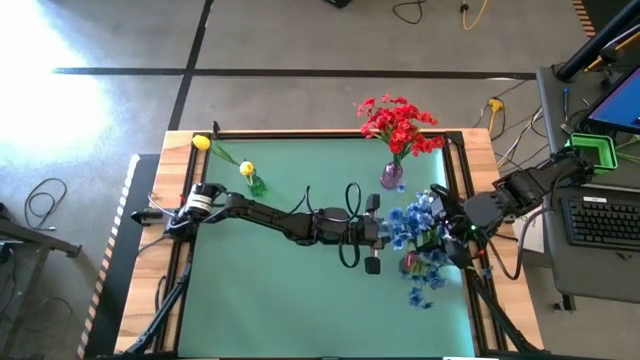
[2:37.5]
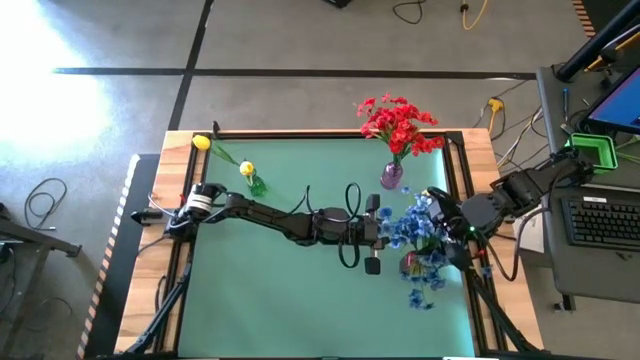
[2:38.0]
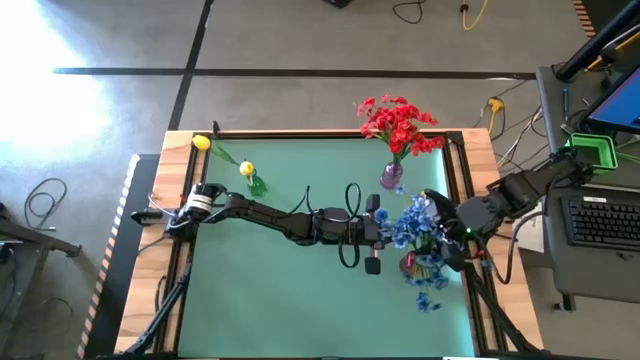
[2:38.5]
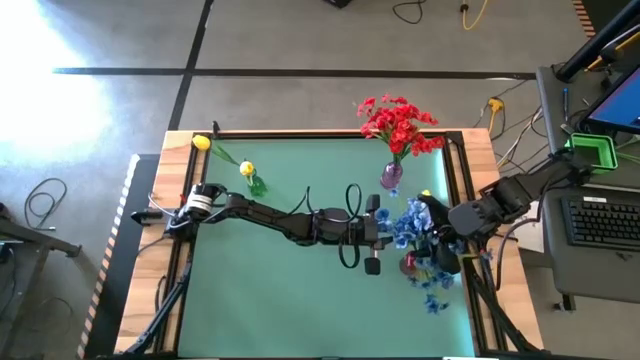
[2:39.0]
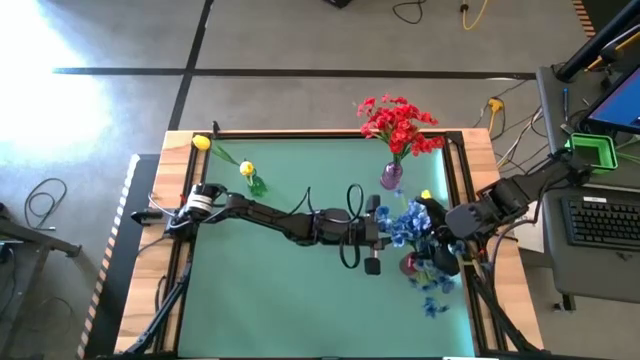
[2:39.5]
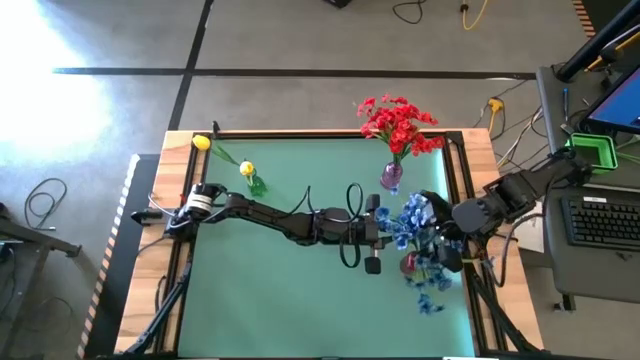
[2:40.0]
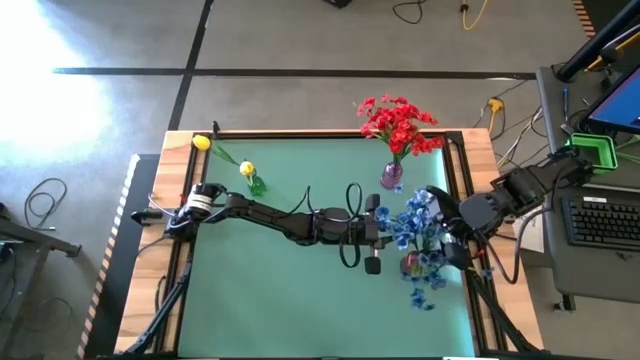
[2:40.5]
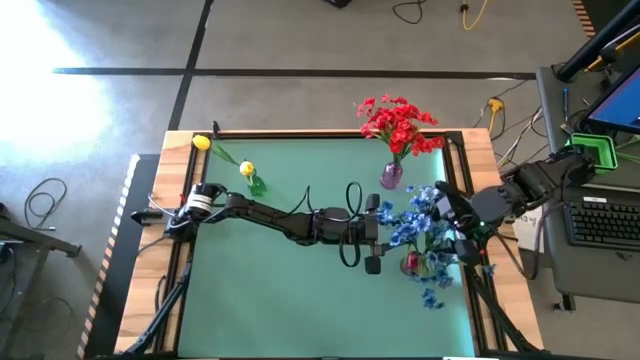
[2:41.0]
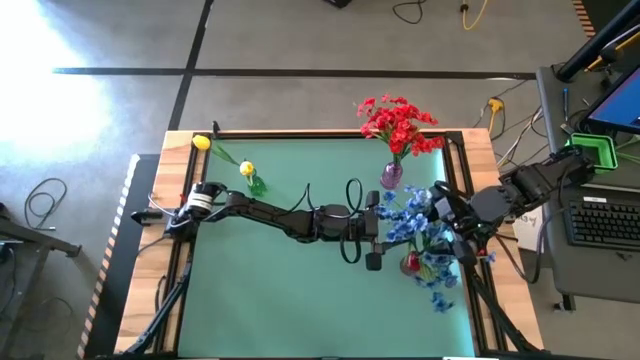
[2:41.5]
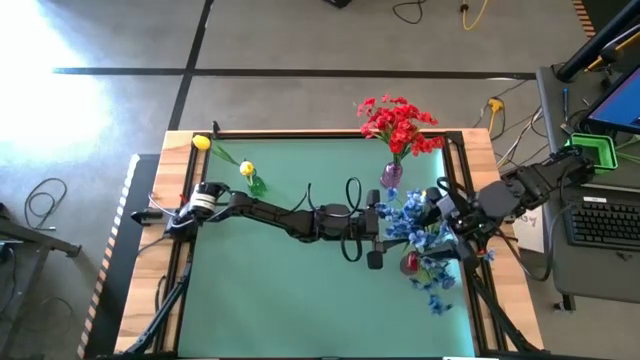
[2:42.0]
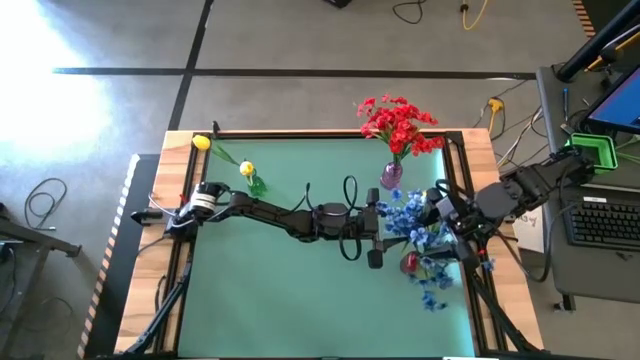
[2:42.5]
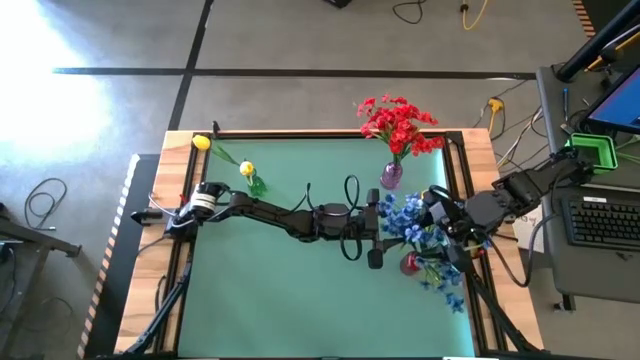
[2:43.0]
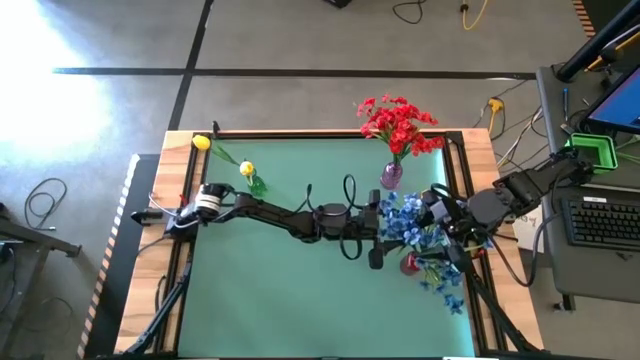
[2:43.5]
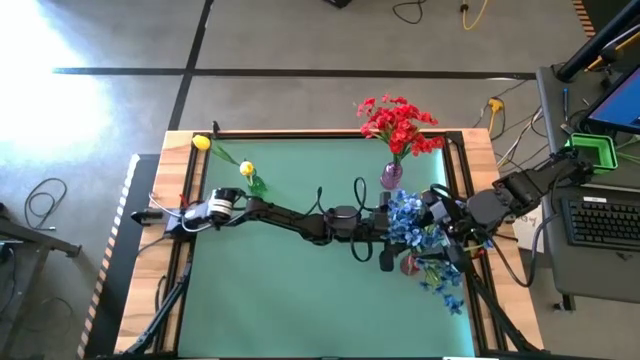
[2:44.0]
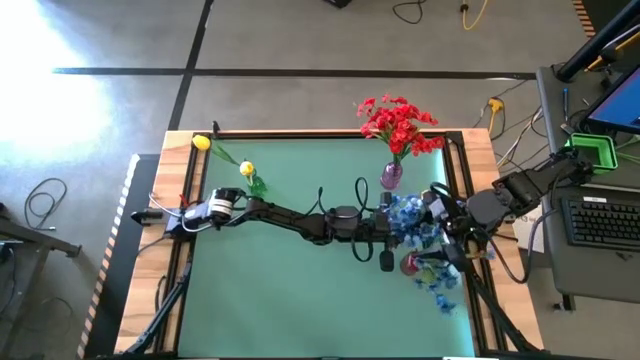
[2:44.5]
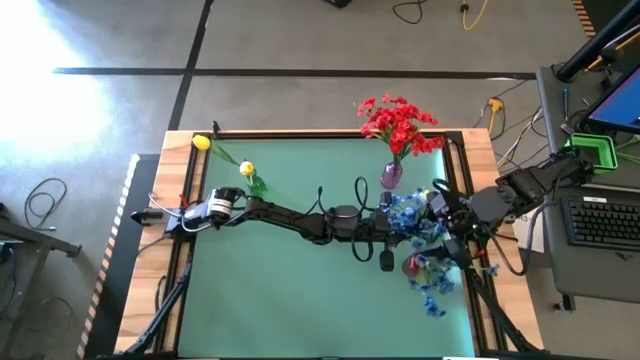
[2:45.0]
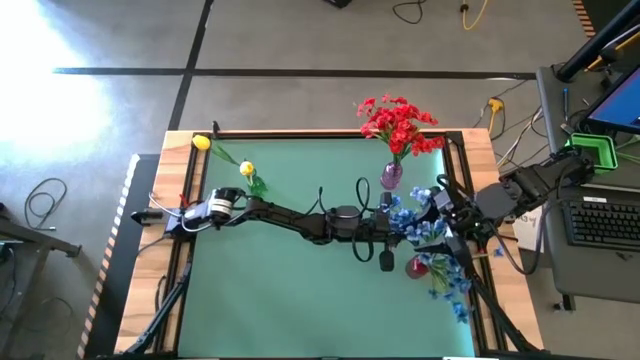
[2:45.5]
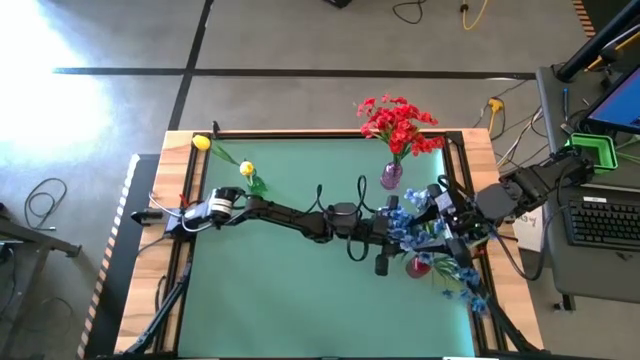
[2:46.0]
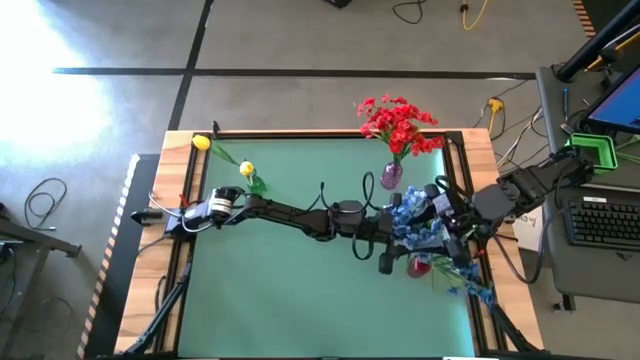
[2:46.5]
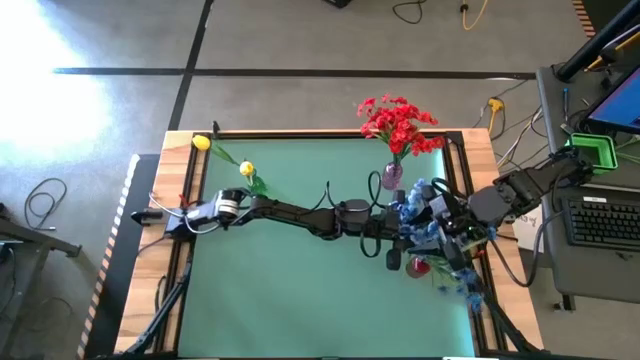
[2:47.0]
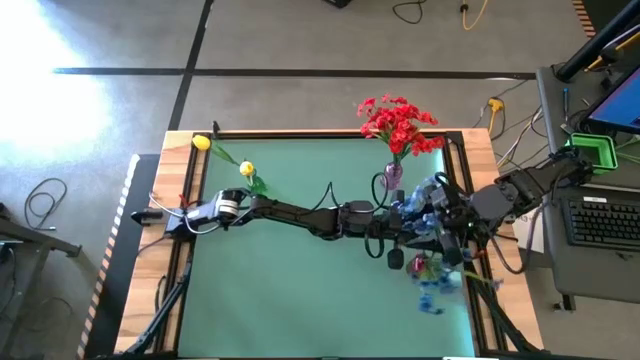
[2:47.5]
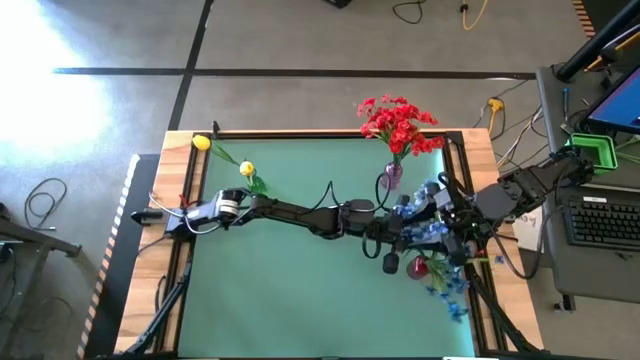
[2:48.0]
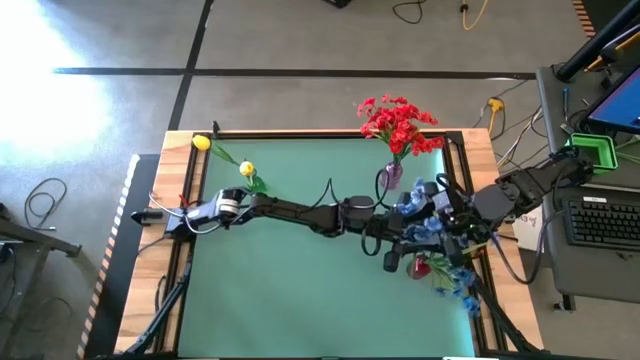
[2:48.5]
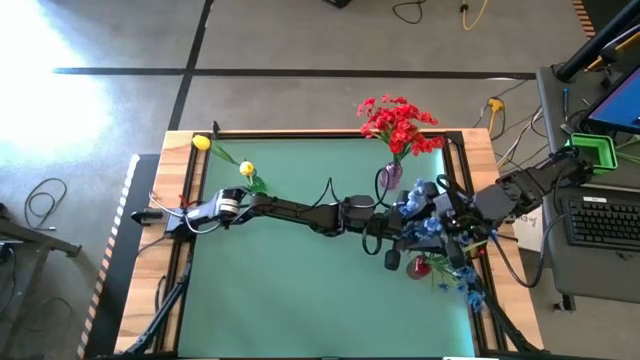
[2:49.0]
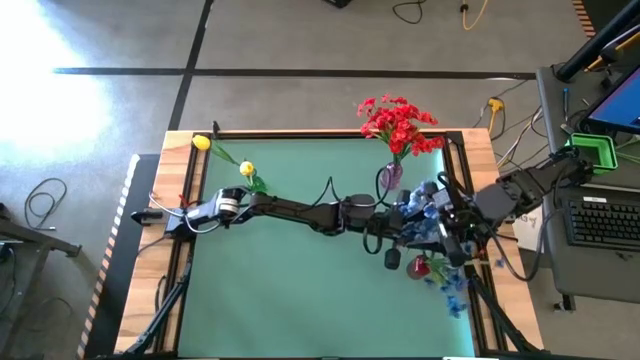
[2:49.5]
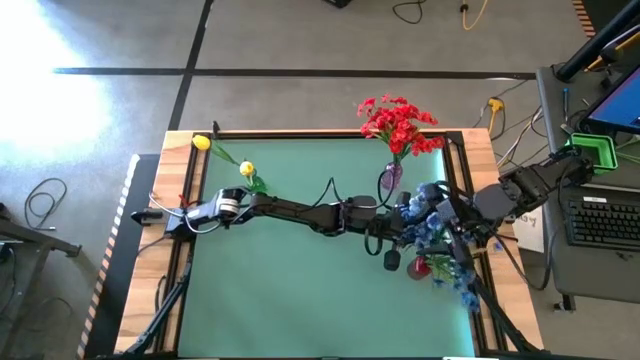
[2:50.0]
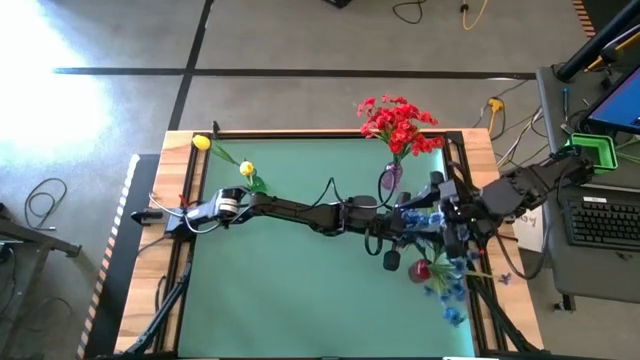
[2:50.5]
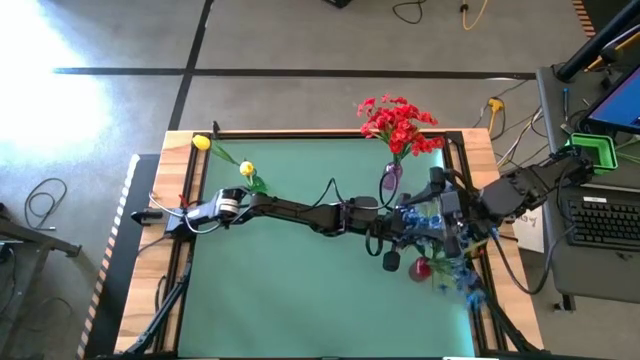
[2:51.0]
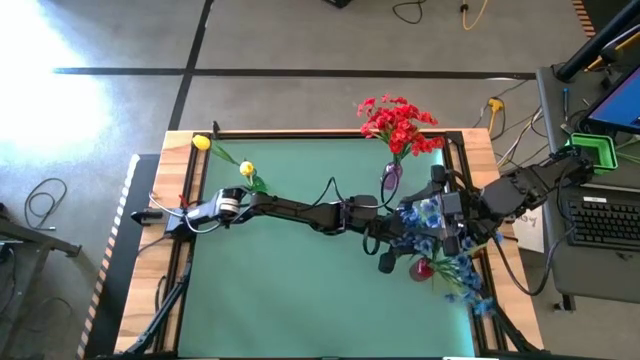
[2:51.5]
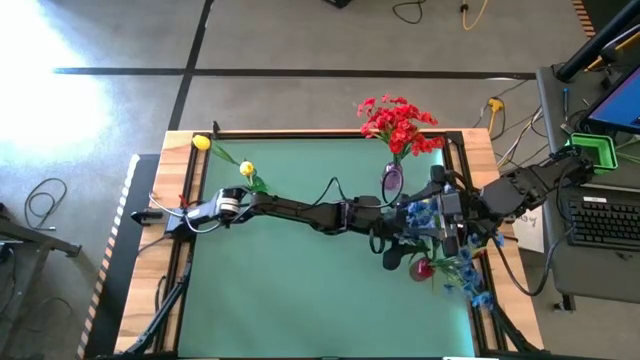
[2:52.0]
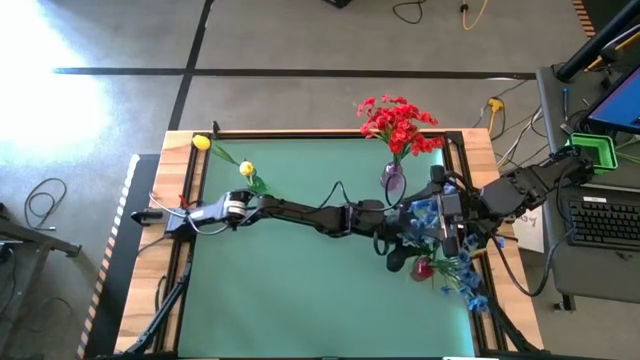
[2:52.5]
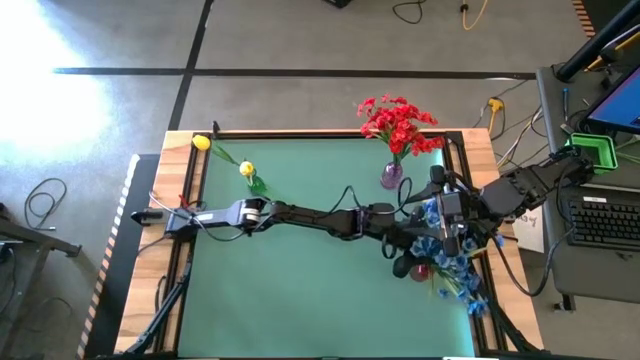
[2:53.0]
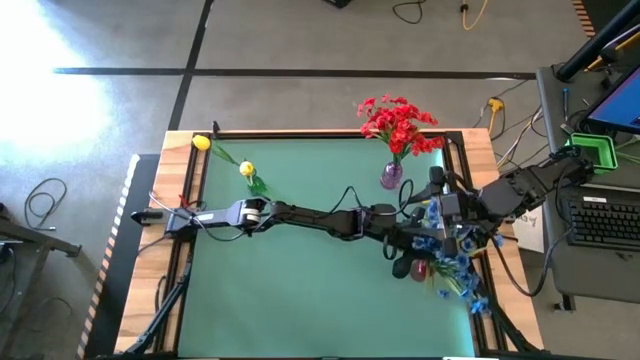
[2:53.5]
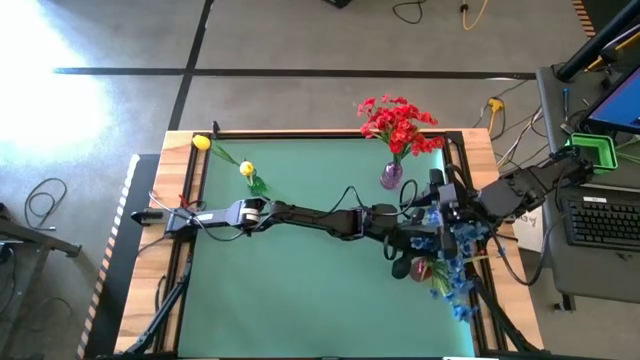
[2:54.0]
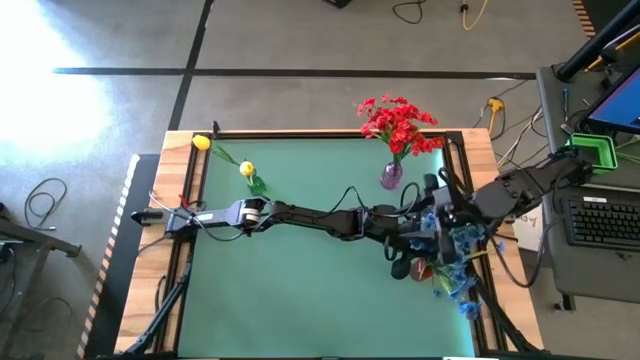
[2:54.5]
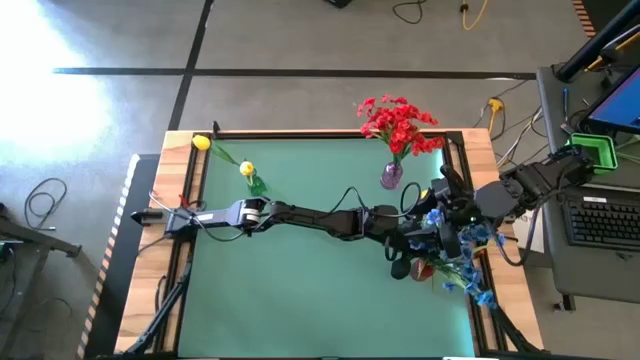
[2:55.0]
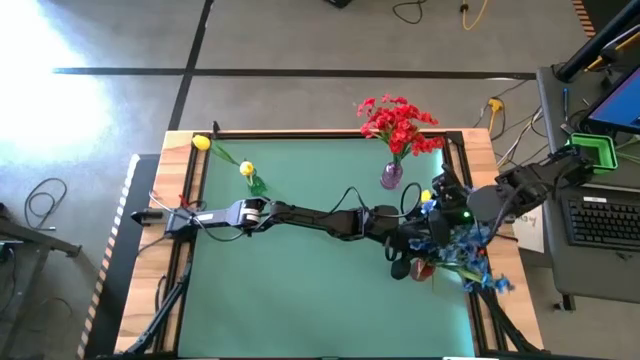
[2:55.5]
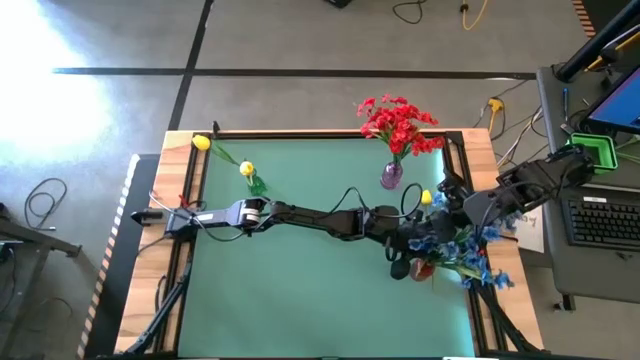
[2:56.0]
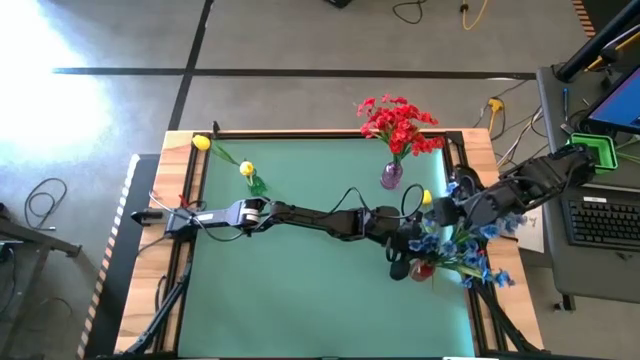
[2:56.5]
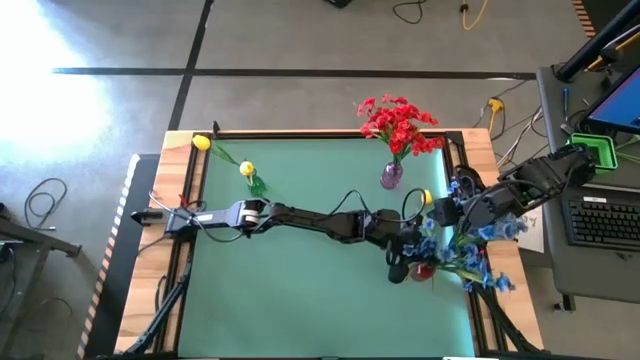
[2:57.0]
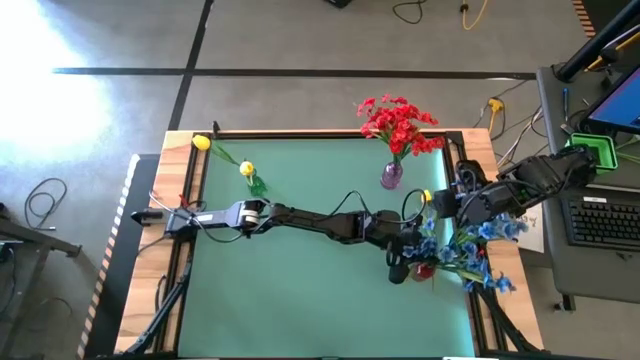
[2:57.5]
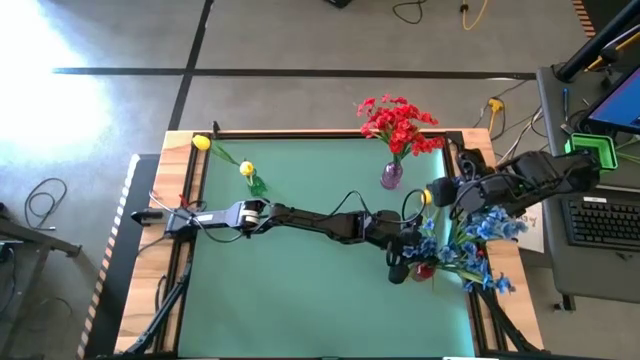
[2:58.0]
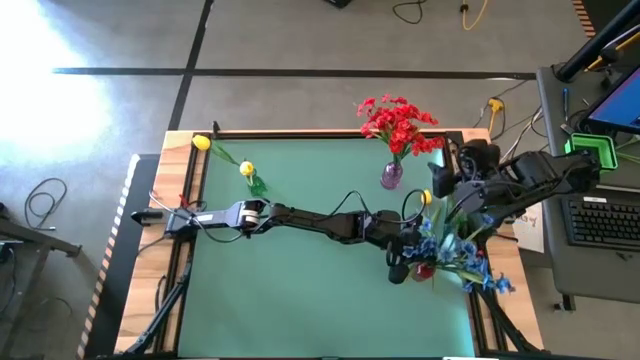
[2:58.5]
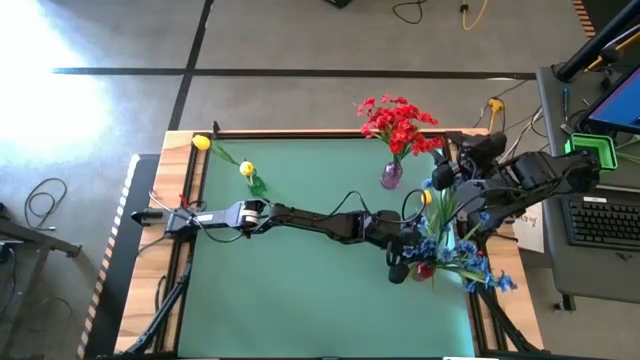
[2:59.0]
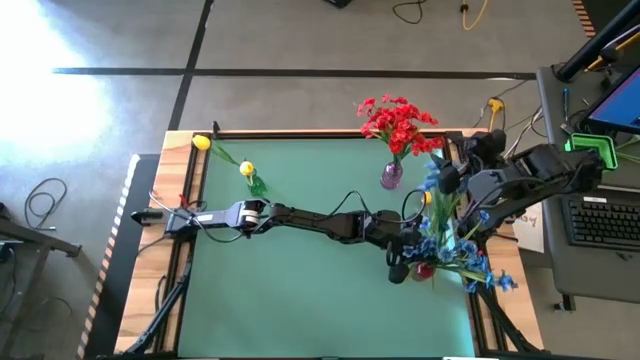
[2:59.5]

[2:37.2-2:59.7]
Task: Sort flowers into vase by color
Put the blue flower into the red vase
